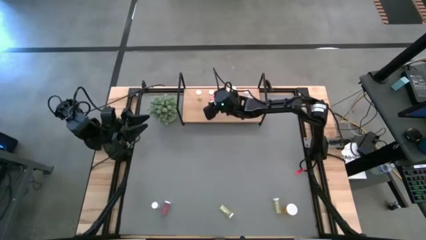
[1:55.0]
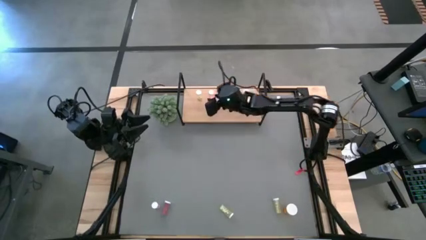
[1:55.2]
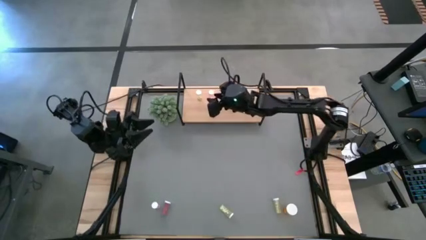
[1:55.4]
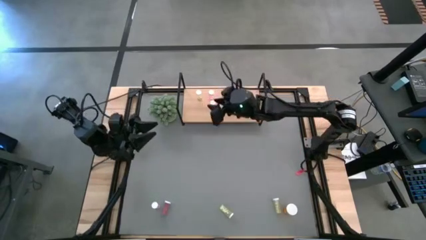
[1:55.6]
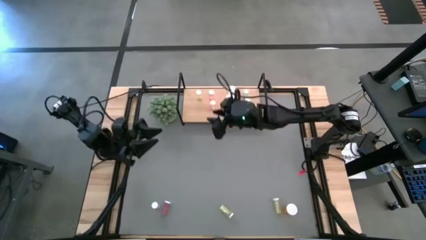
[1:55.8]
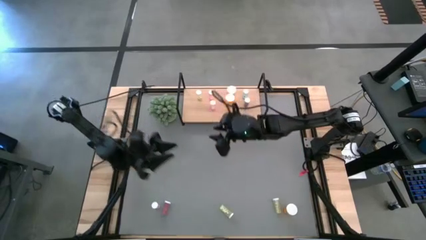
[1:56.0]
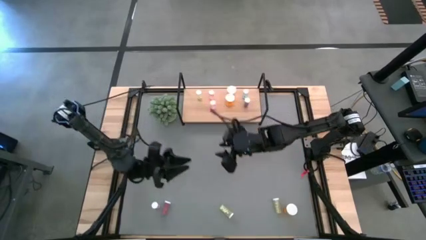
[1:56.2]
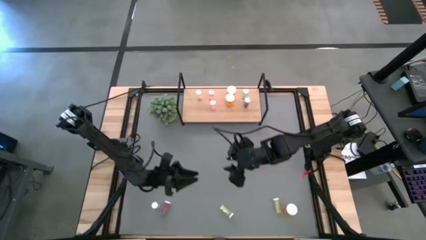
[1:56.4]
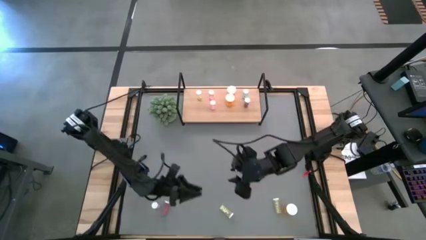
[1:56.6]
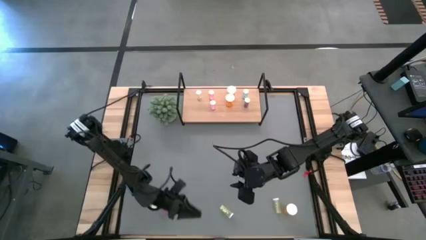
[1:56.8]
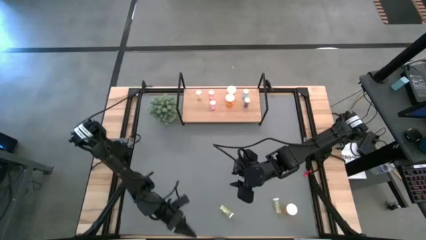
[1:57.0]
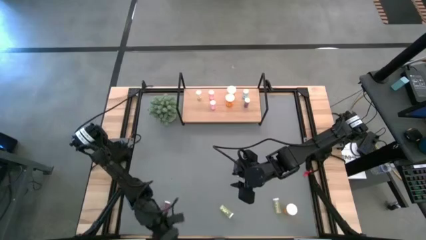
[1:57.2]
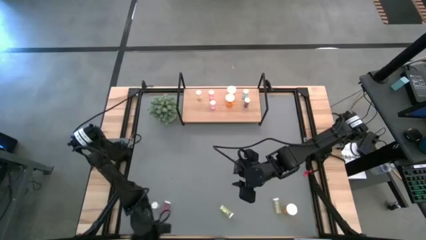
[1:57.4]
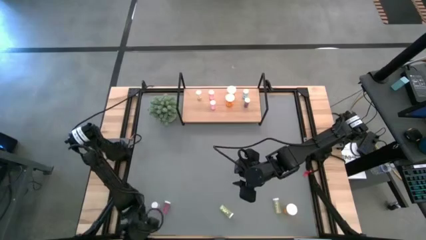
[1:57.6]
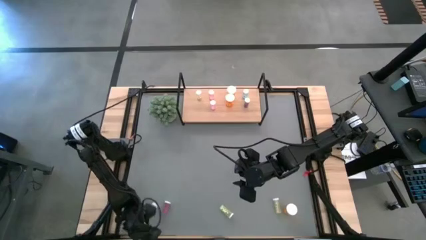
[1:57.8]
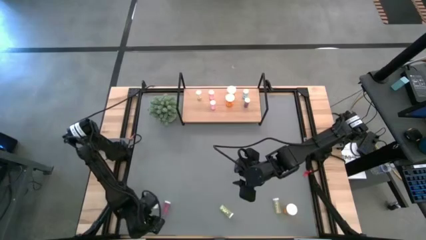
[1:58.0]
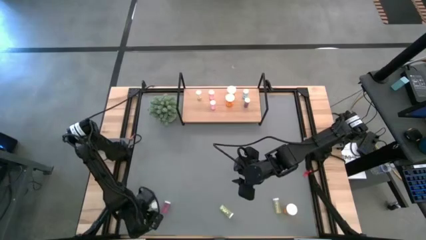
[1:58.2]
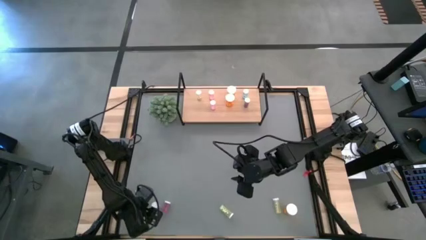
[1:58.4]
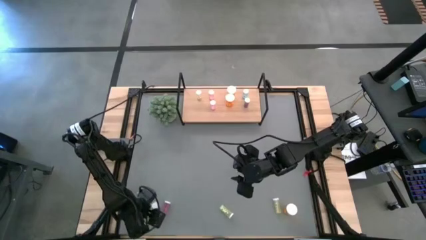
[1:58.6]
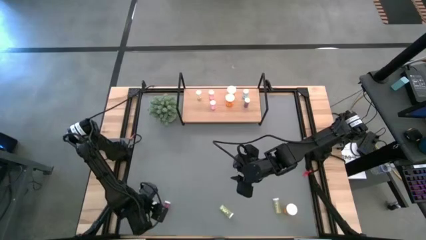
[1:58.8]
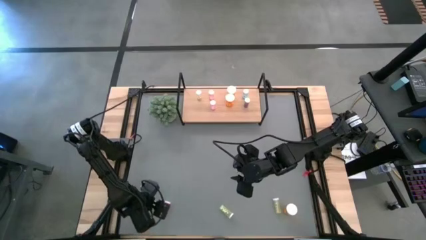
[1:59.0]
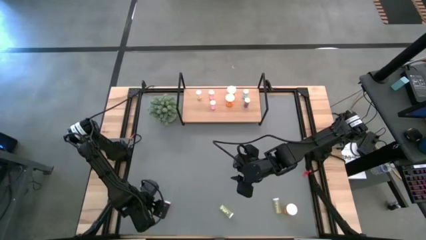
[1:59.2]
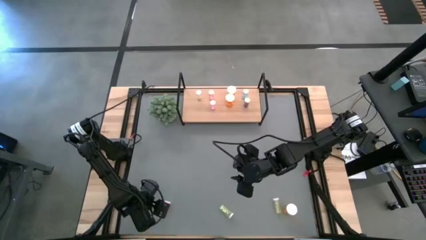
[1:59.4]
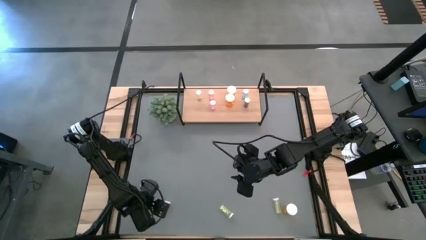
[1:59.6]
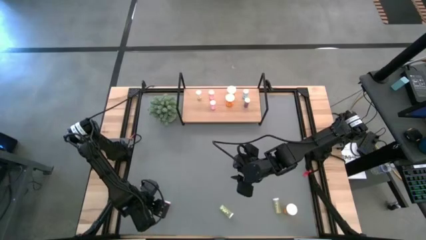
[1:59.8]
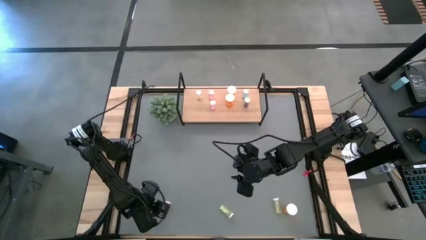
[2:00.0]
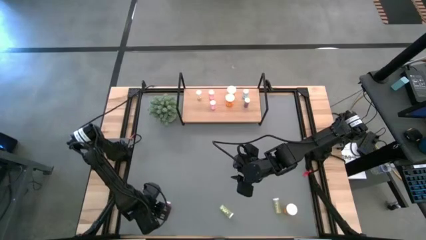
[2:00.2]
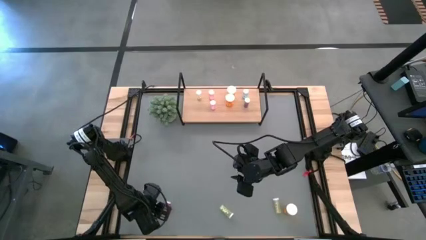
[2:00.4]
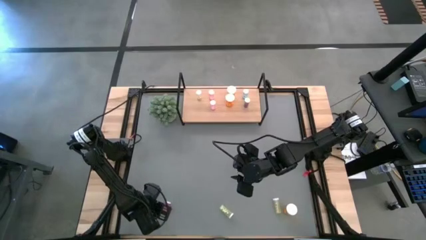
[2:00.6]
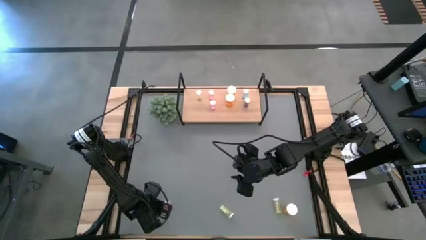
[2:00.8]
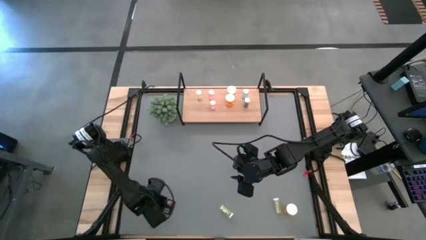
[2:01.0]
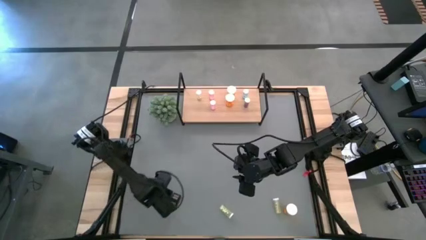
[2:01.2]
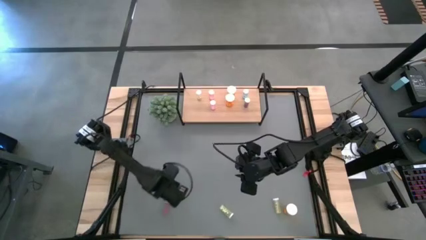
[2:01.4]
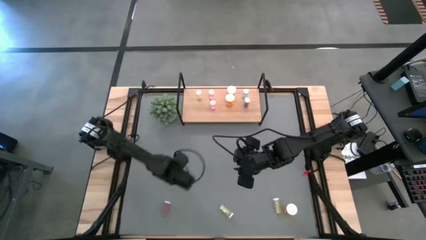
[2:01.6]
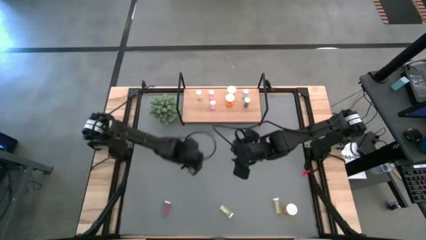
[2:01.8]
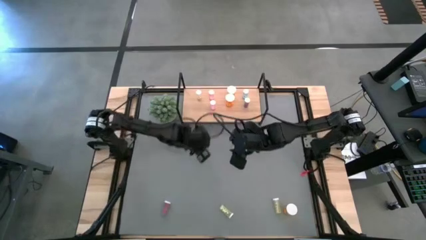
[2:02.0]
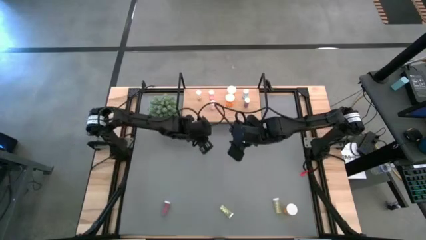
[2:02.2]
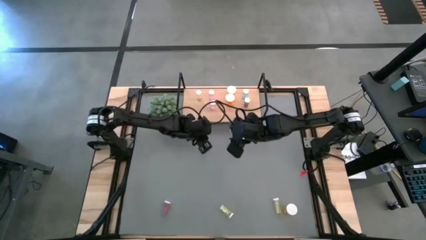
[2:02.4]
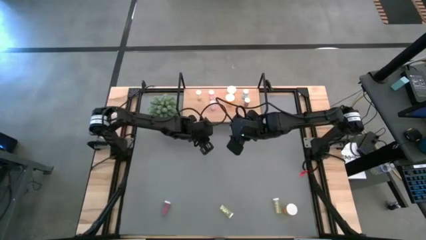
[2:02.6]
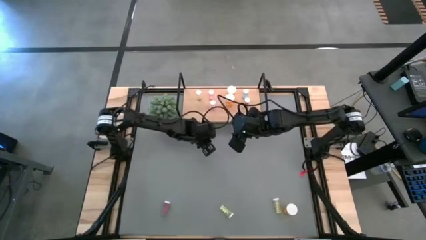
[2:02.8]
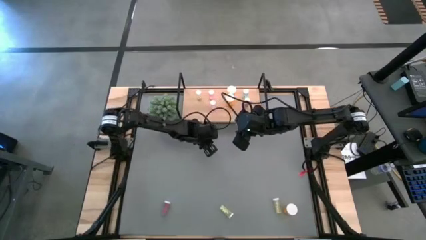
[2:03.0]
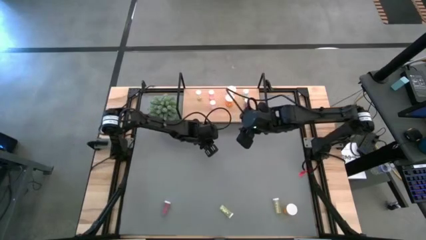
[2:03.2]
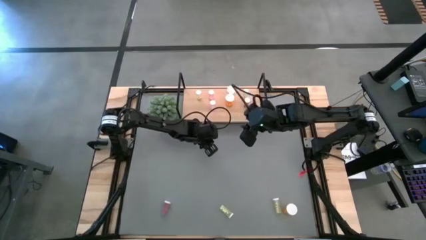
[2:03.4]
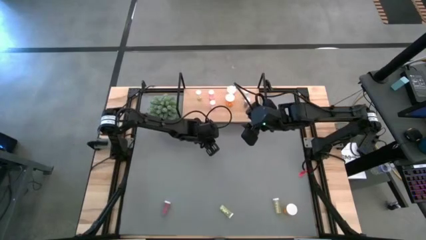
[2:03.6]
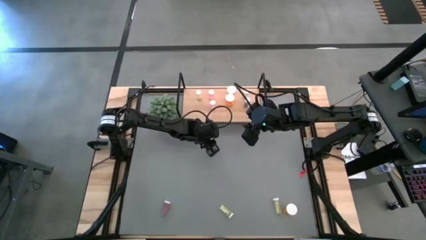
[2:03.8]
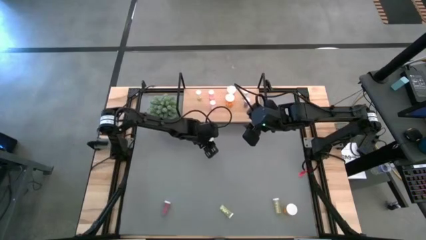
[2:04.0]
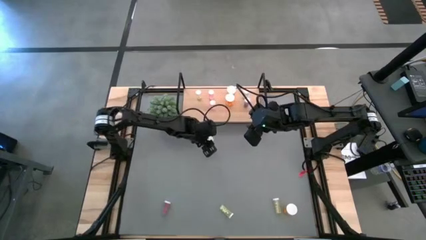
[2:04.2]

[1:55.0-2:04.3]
Task: Pick and place medicine bottles onto shelf by color
Move the pink pill bottle to the center of the table

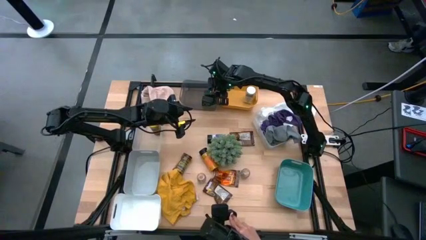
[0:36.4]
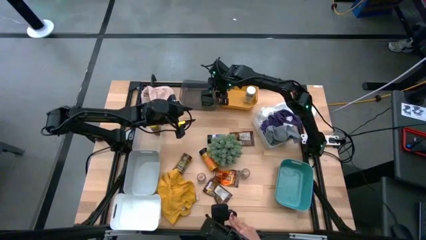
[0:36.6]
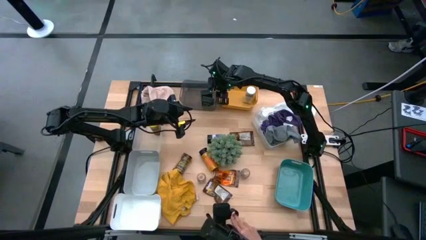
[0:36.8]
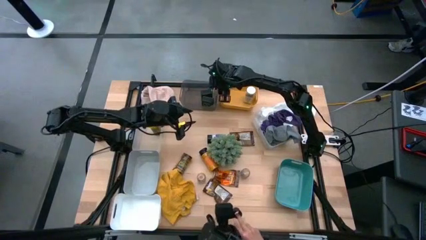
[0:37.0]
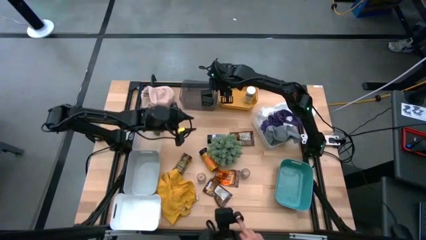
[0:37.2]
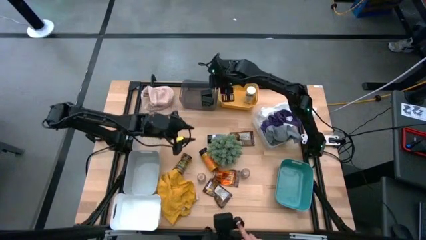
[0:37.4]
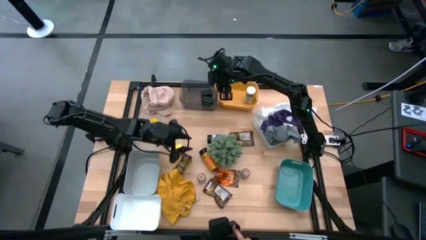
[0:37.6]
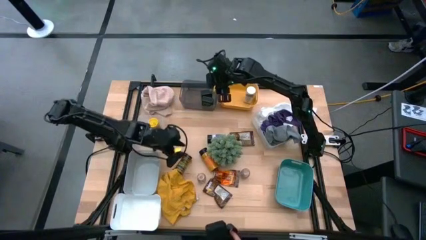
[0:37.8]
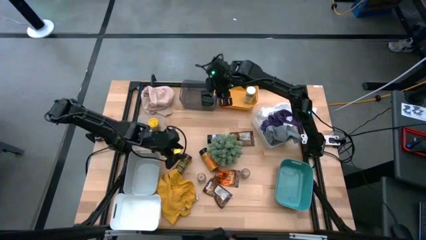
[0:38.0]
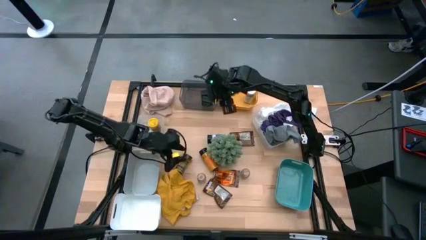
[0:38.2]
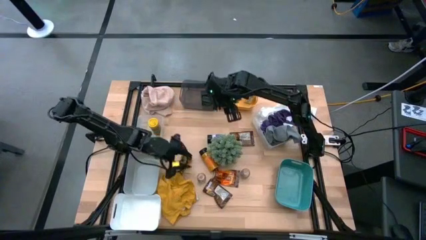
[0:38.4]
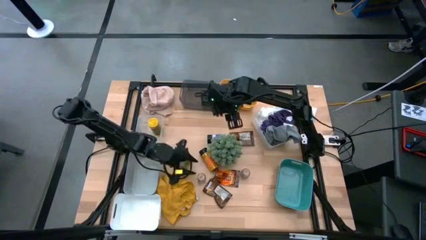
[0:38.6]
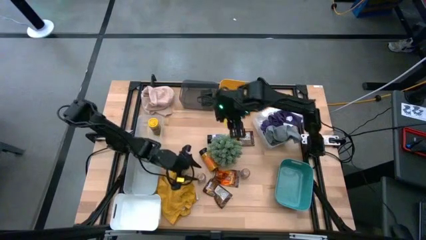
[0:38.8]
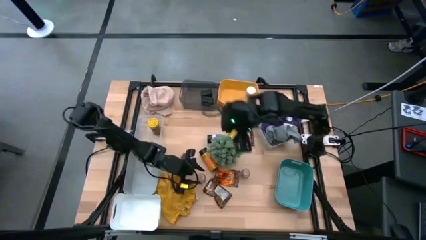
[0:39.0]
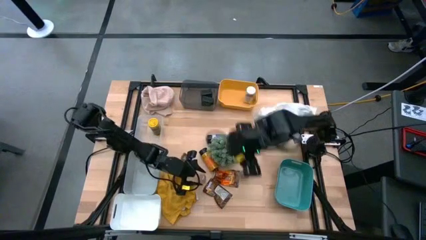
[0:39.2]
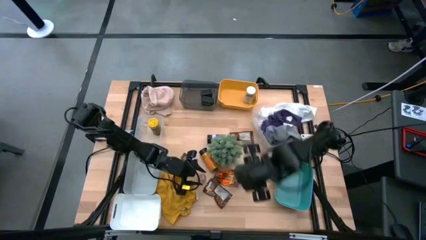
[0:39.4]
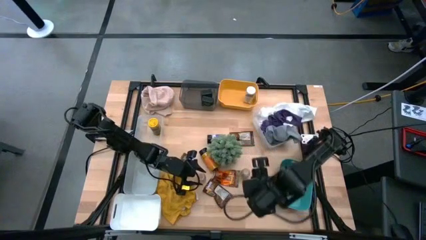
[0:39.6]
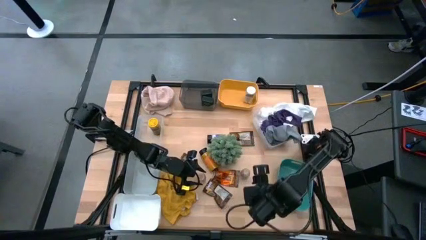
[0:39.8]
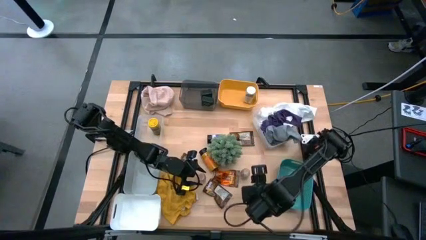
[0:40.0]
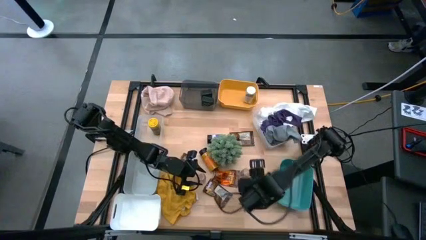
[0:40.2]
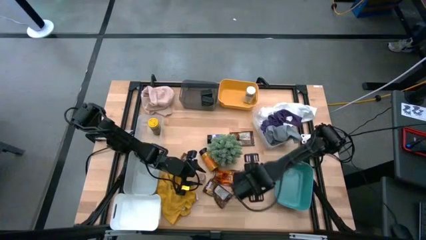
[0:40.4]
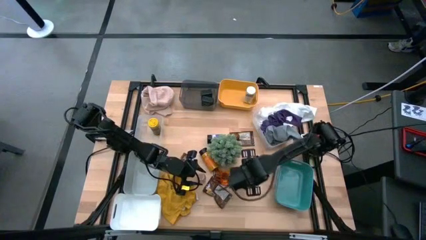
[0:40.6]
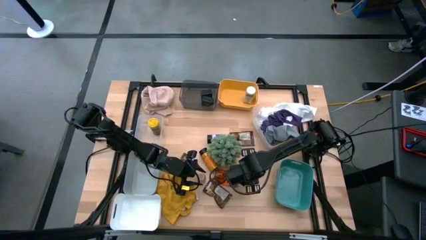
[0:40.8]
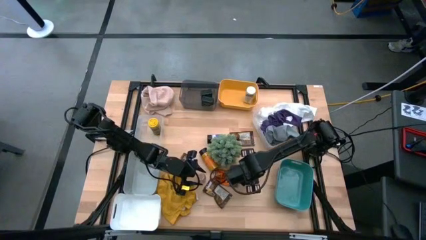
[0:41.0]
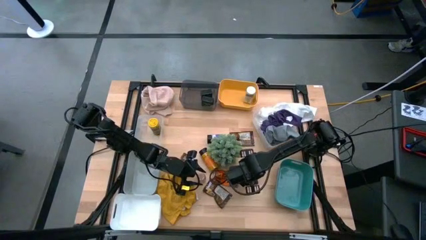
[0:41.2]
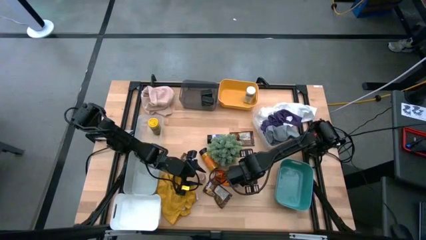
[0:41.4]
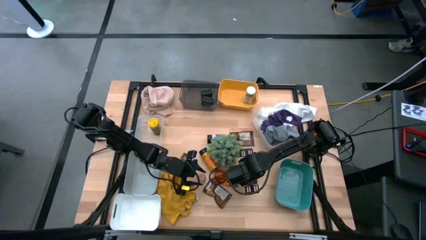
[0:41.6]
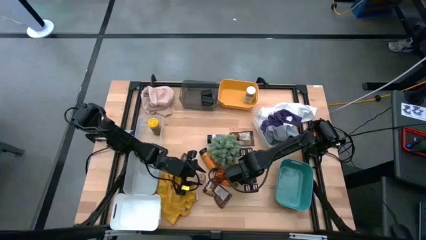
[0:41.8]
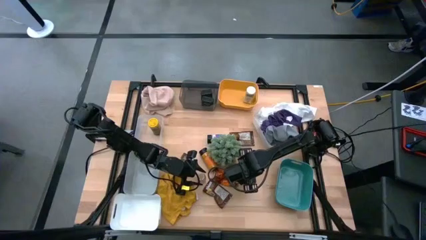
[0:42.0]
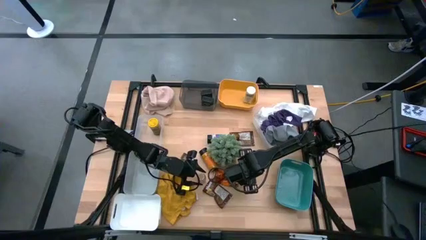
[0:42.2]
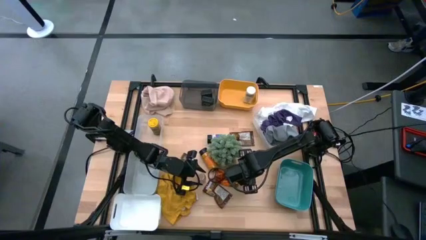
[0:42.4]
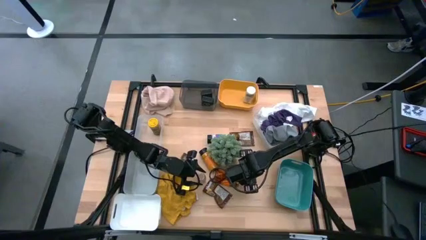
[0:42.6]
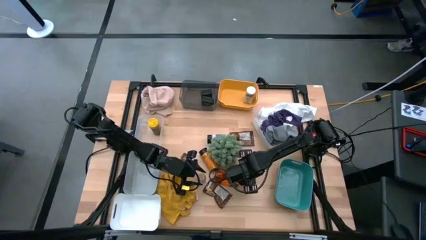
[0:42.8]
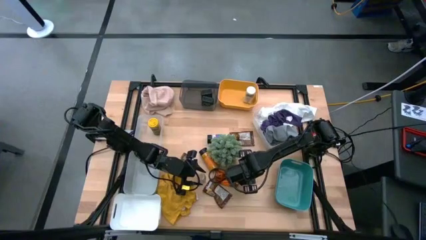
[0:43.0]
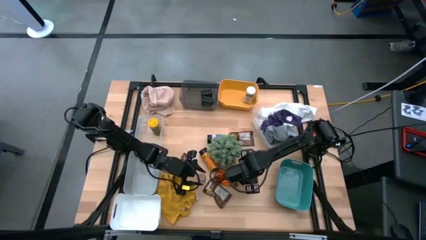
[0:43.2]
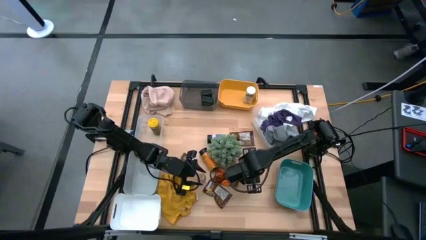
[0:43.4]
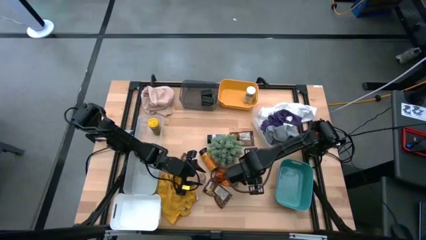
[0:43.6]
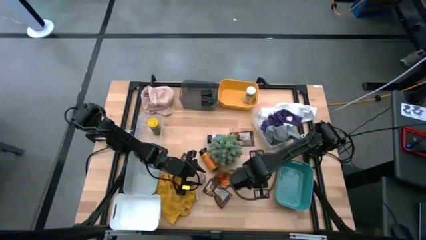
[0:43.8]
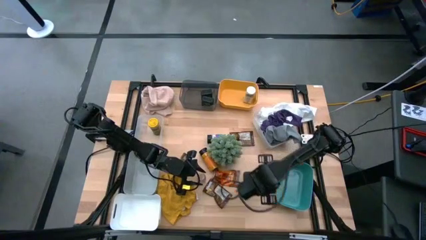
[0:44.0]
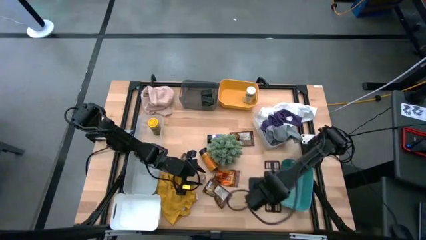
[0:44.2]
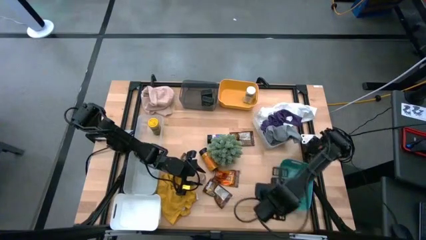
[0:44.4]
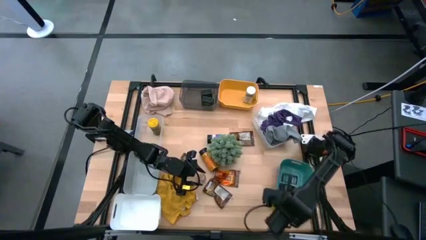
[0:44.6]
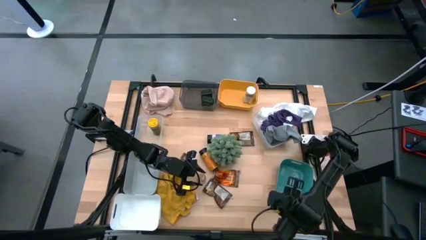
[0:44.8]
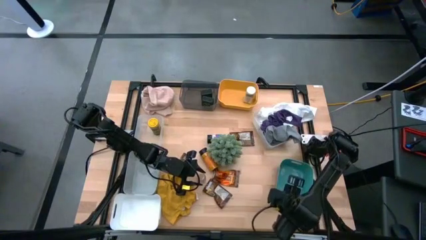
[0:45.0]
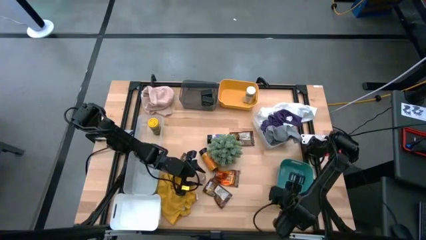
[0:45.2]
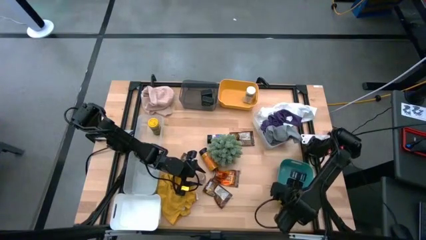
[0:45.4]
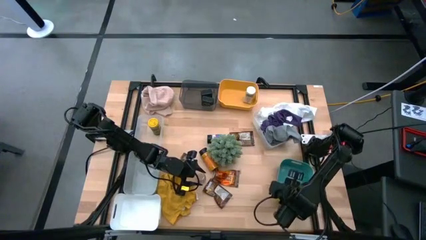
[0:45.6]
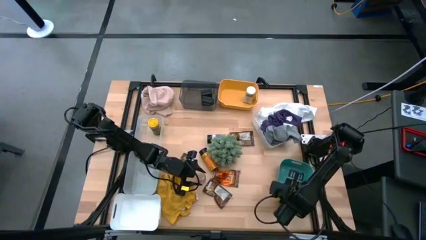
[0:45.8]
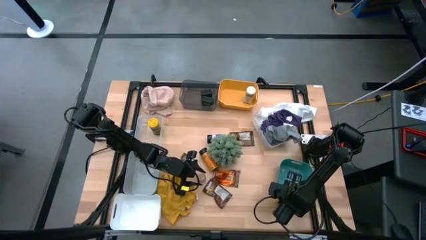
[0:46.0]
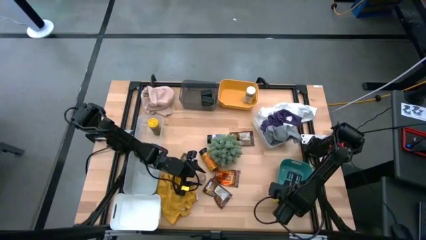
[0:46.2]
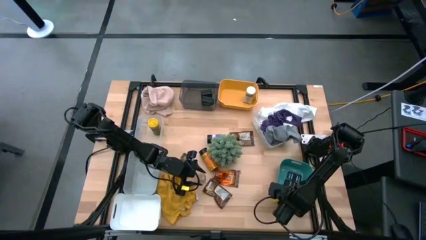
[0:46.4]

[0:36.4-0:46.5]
Task: Sort spices by type
Put the brown spice bottle into the green bin
